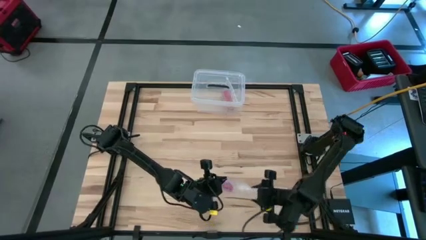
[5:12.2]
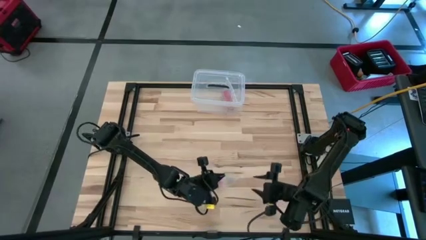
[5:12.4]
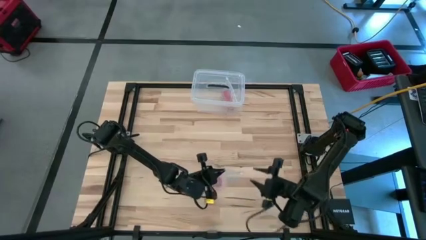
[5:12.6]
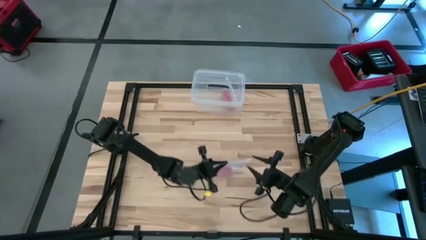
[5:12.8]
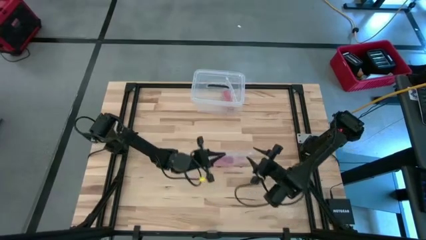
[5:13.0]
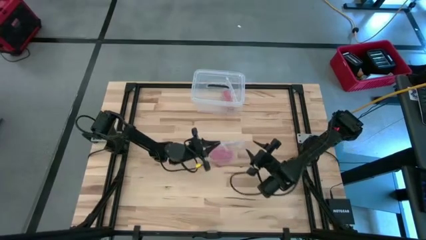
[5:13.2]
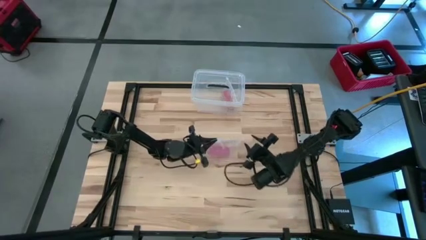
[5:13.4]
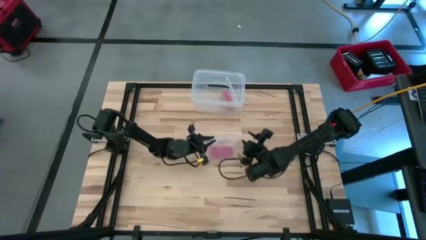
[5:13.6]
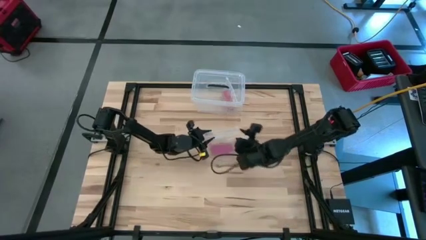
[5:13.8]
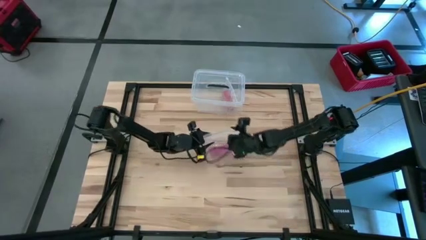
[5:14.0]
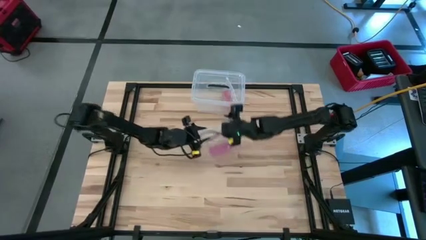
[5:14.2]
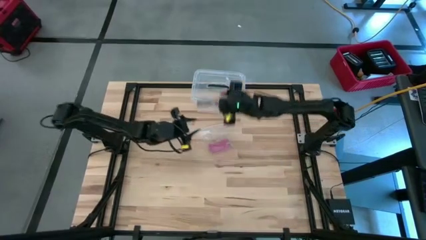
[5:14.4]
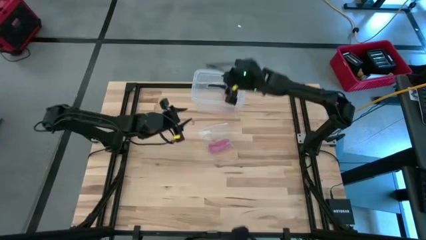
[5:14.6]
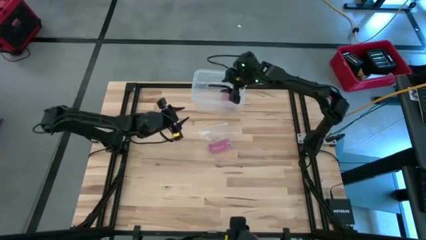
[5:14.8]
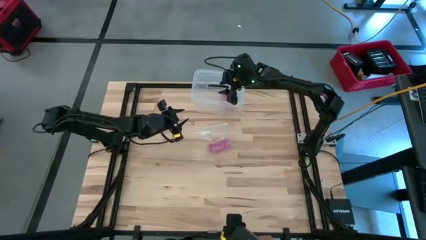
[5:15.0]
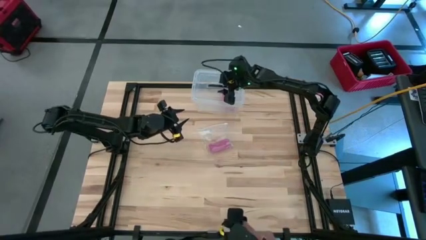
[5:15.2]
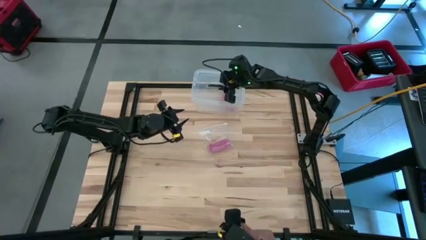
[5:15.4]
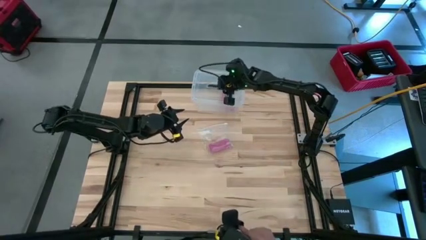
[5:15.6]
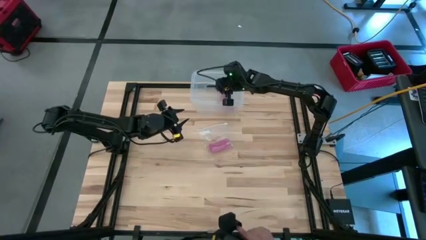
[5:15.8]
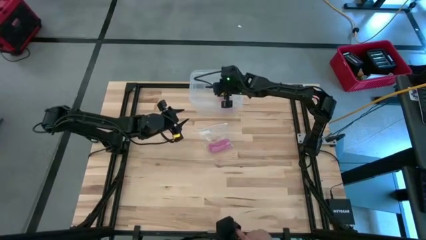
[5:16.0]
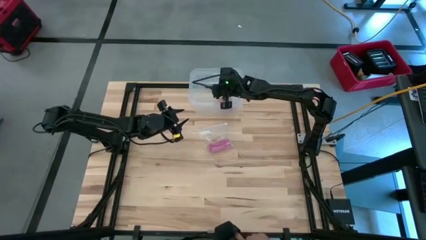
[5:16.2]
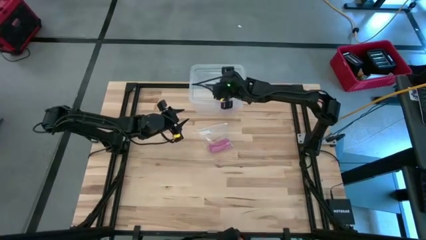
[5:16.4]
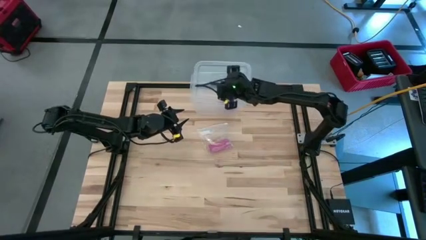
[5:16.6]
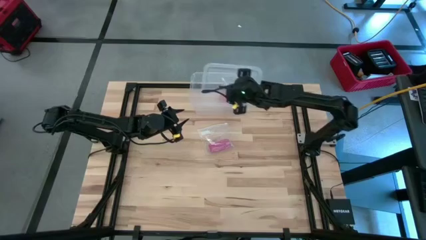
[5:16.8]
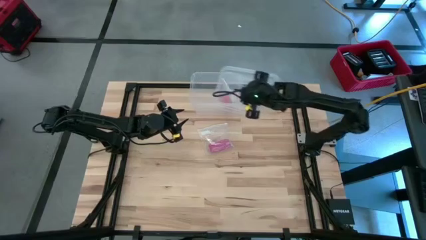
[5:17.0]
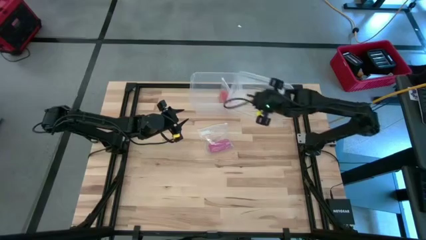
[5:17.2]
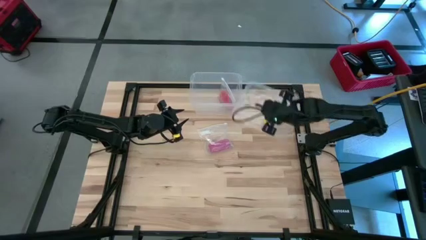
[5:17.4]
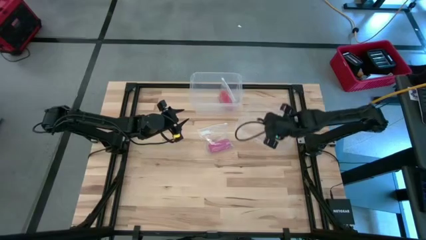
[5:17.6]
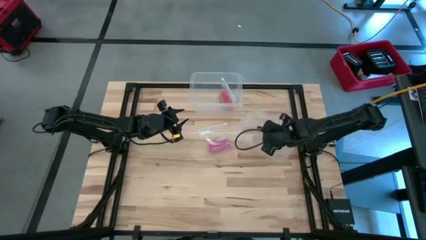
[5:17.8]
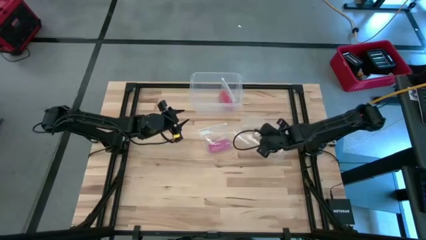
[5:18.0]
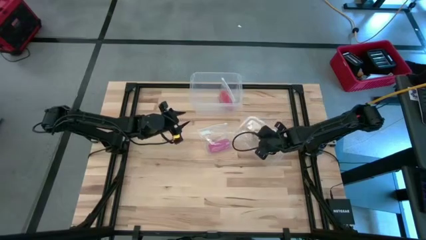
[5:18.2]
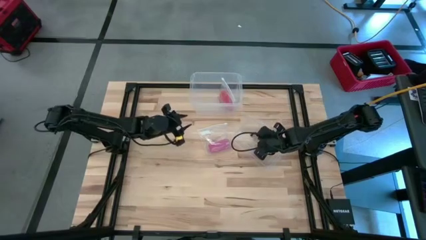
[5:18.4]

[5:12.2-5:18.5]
Task: Roll bandage
Open the transparent bin lid

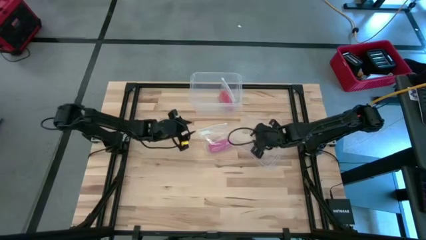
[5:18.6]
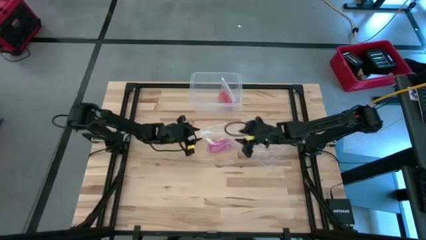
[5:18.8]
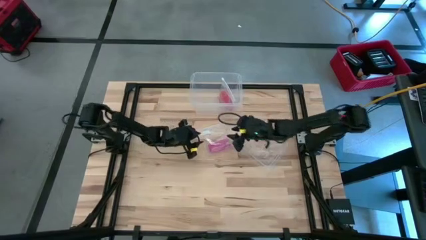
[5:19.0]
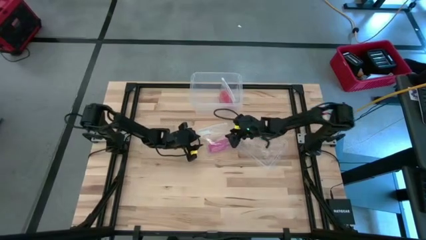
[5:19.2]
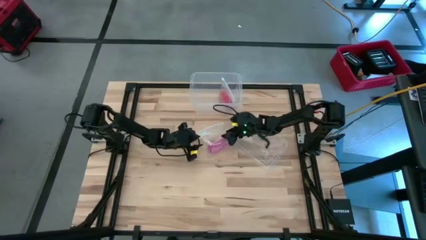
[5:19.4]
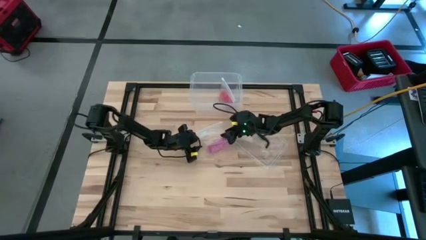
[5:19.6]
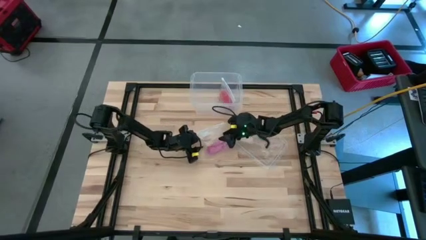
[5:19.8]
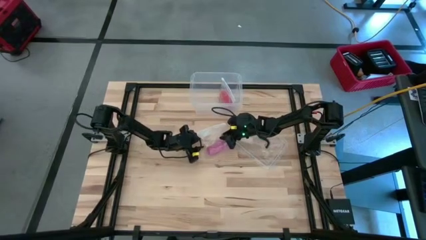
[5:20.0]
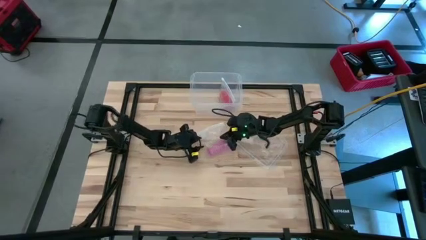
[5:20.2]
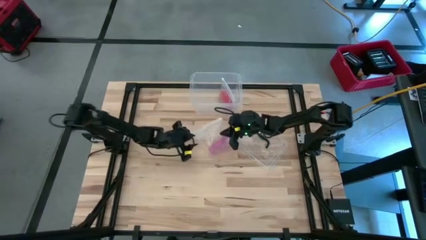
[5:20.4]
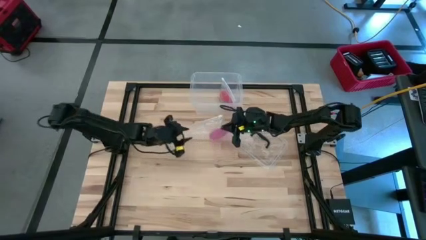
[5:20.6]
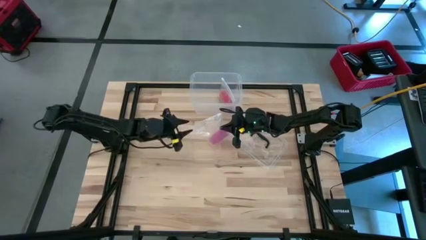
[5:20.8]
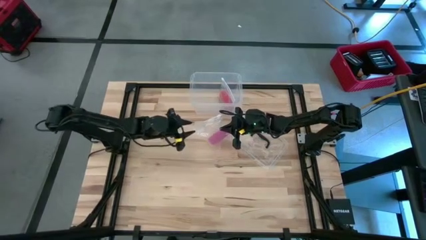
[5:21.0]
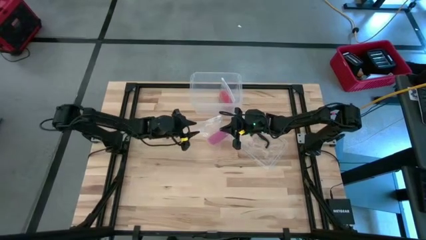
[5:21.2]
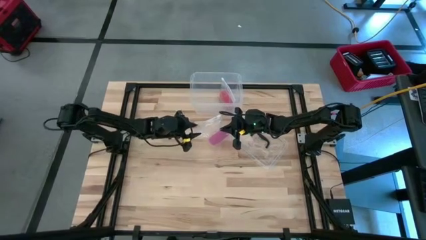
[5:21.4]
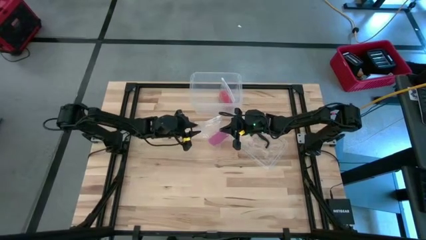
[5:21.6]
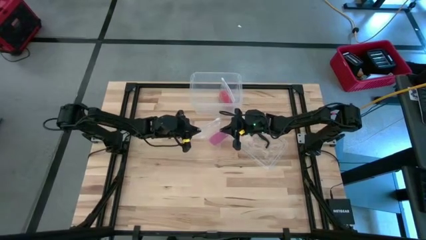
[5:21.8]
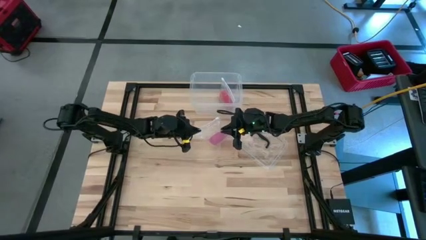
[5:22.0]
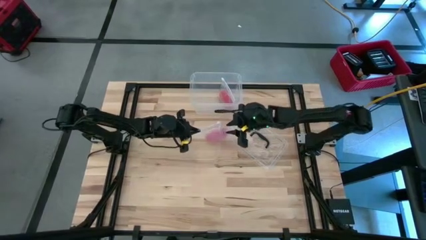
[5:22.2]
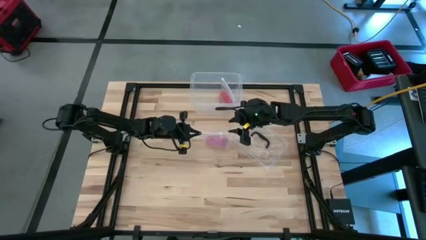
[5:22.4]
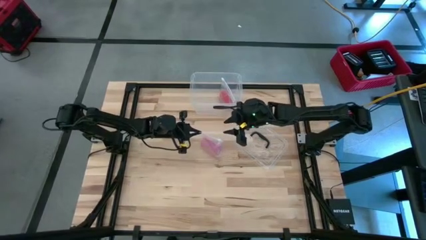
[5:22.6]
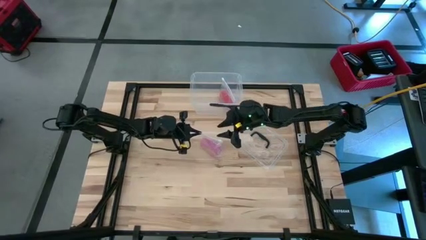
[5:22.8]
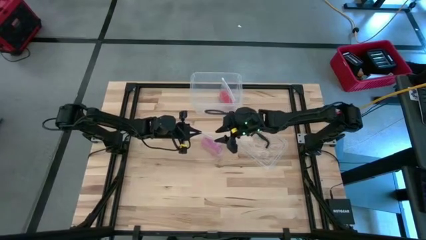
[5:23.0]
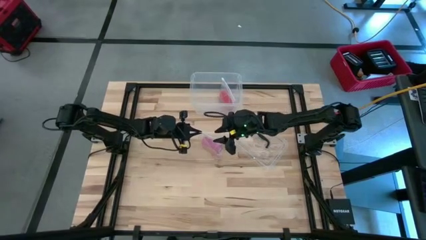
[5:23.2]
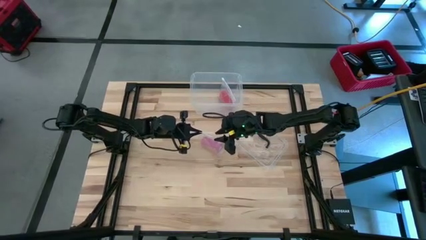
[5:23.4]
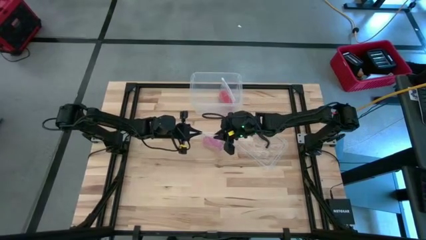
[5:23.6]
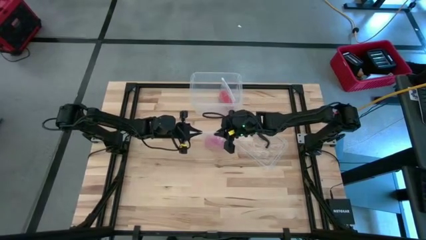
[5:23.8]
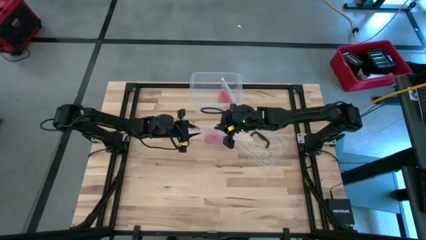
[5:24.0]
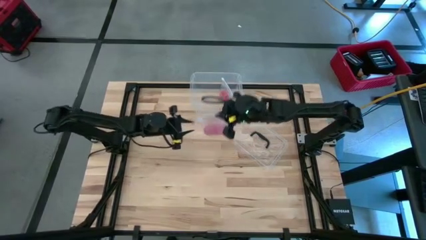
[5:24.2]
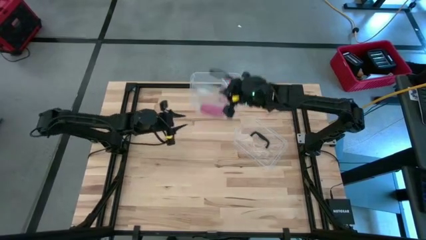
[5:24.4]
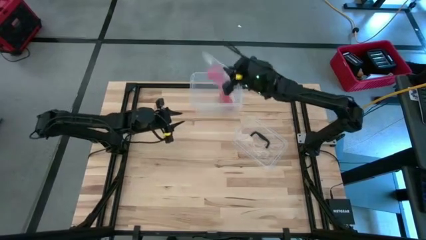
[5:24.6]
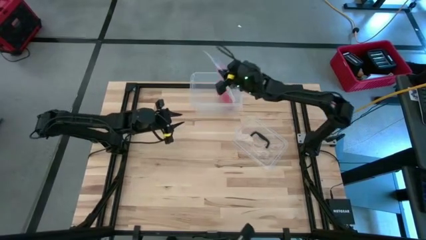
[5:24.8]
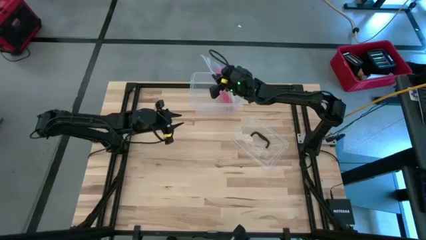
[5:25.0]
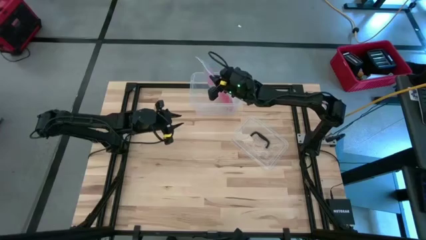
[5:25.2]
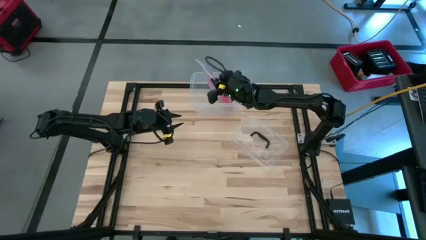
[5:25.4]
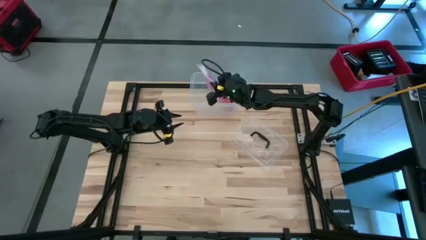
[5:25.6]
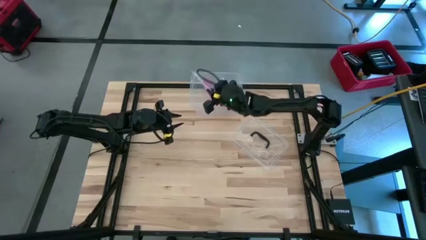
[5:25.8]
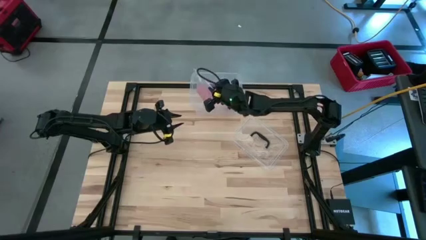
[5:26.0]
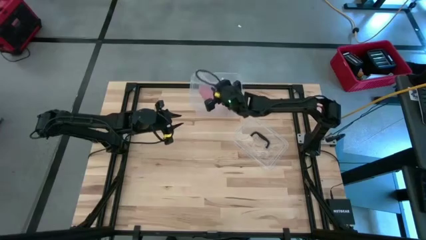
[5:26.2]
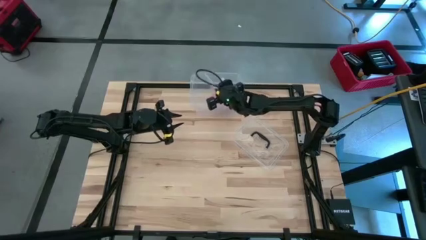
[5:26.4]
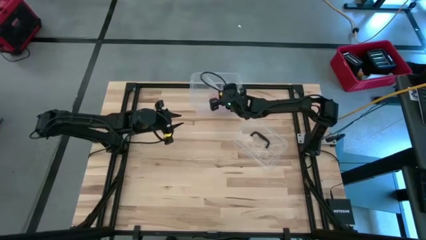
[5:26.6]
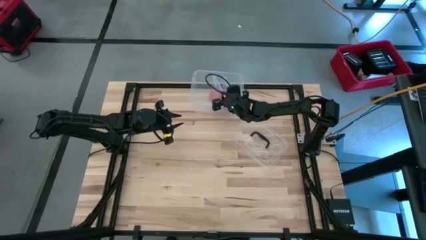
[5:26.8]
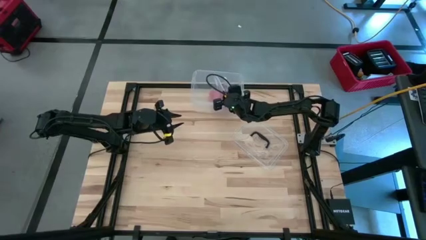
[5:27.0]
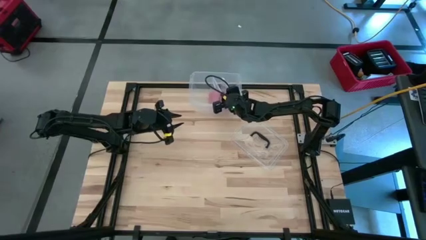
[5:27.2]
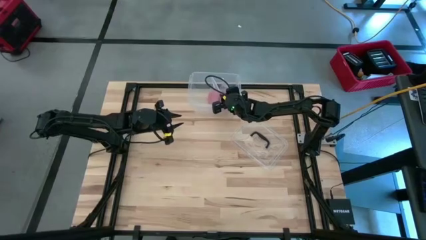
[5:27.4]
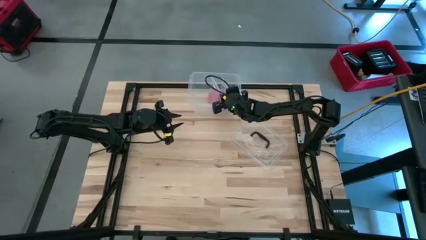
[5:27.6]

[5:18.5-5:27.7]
Put the packed bandage into the transparent bin
